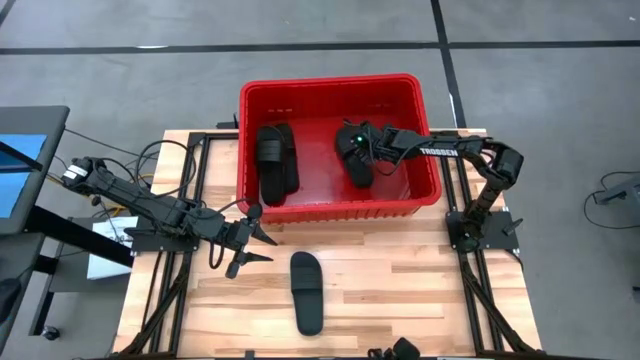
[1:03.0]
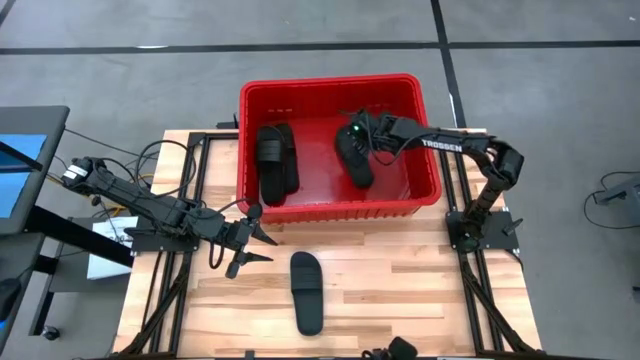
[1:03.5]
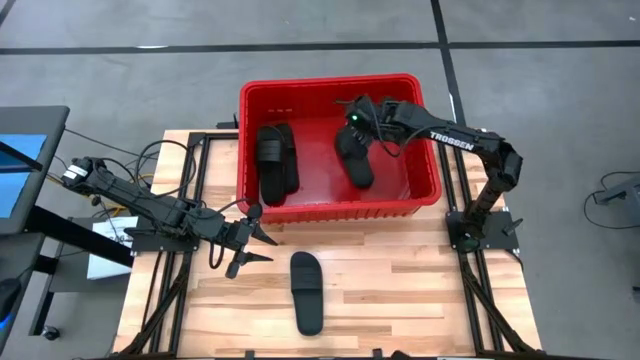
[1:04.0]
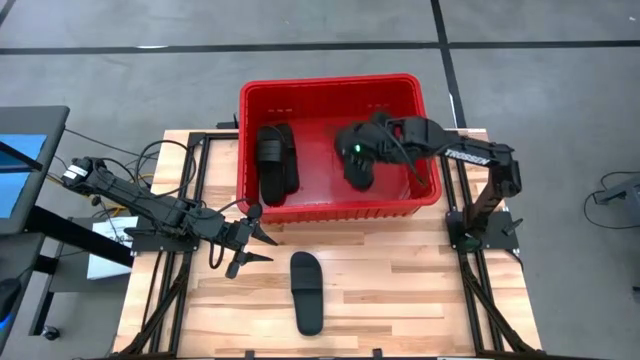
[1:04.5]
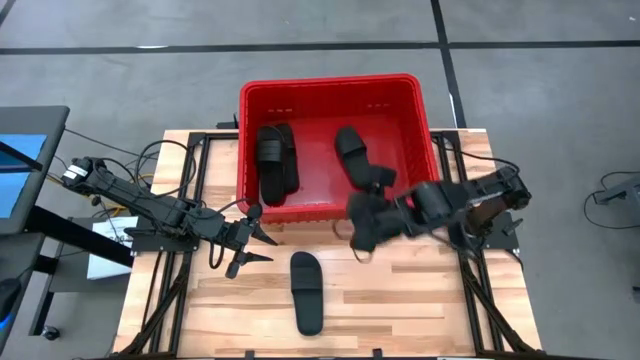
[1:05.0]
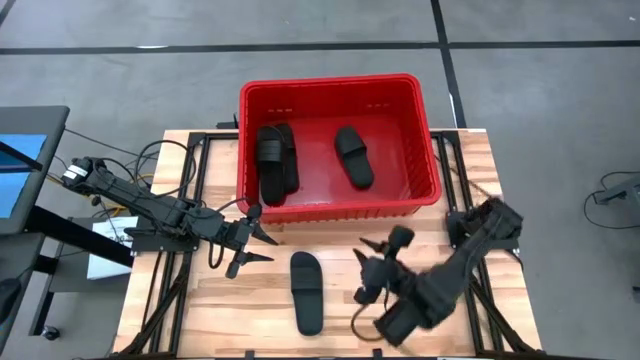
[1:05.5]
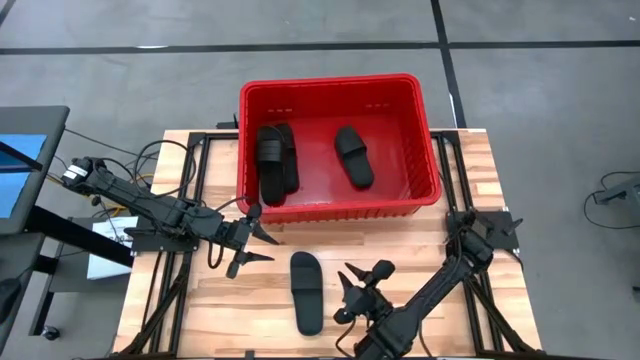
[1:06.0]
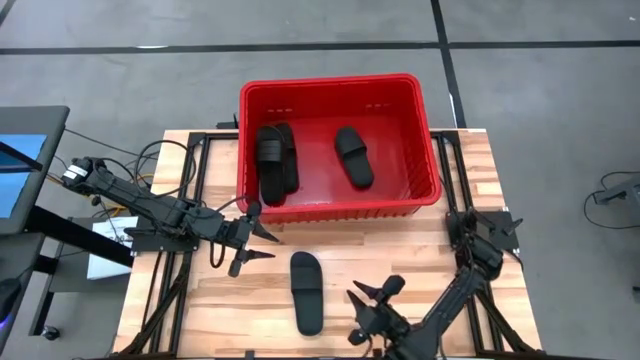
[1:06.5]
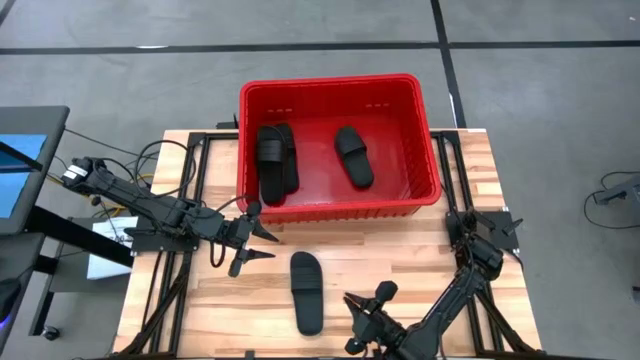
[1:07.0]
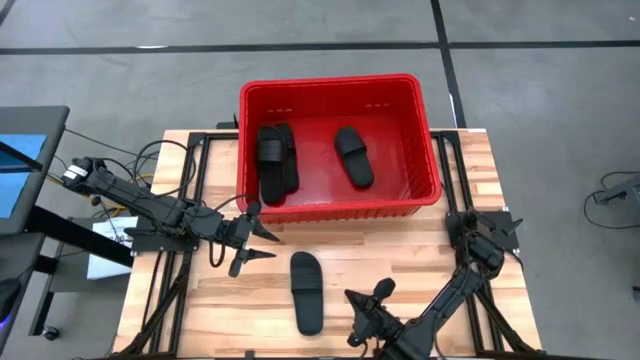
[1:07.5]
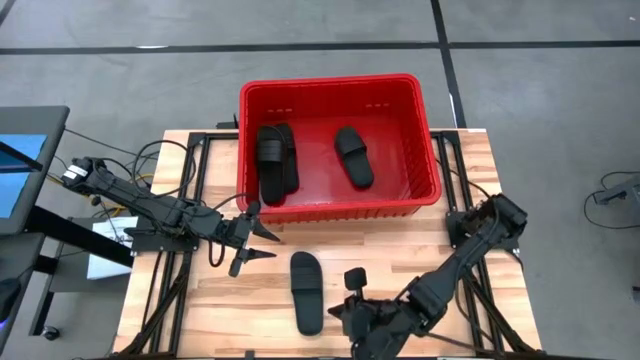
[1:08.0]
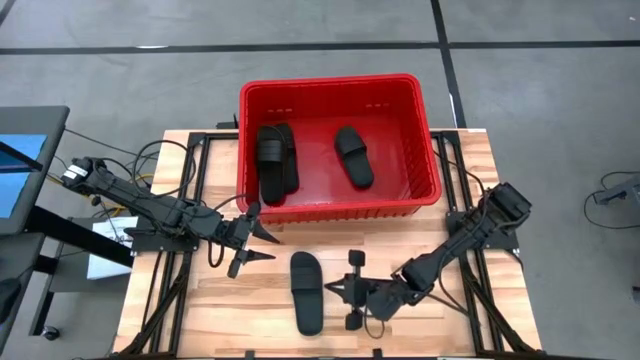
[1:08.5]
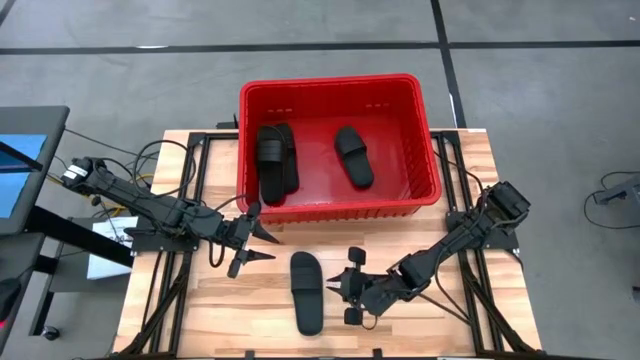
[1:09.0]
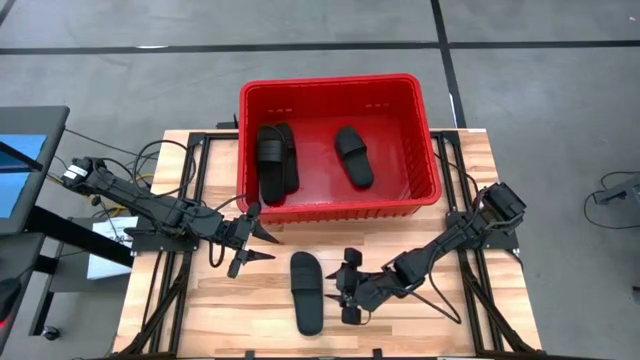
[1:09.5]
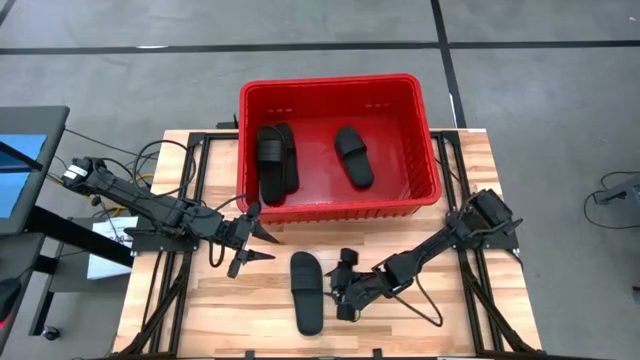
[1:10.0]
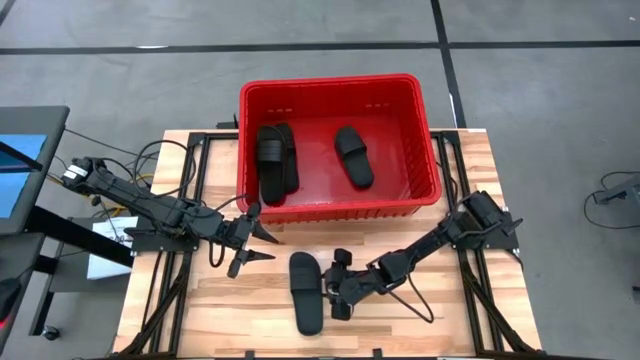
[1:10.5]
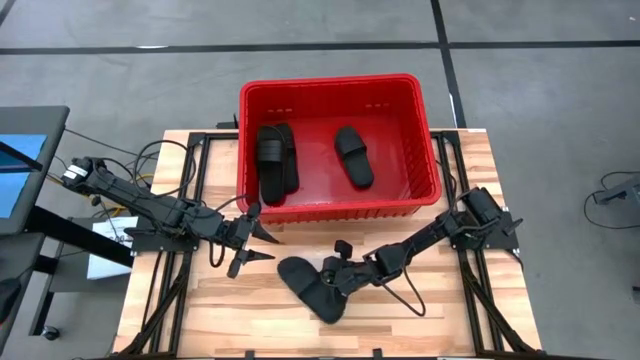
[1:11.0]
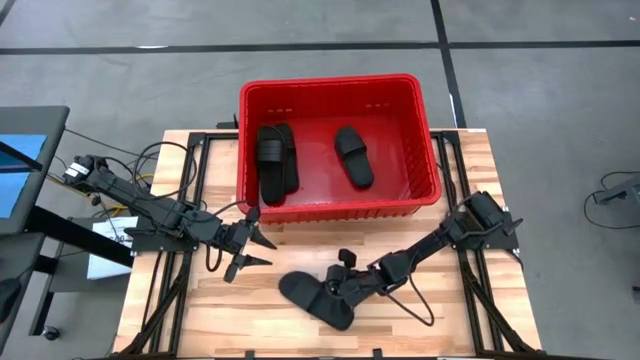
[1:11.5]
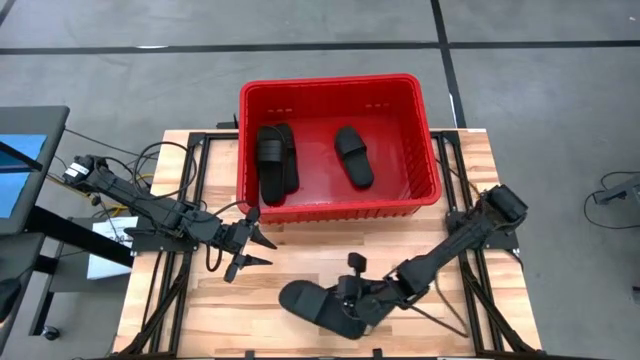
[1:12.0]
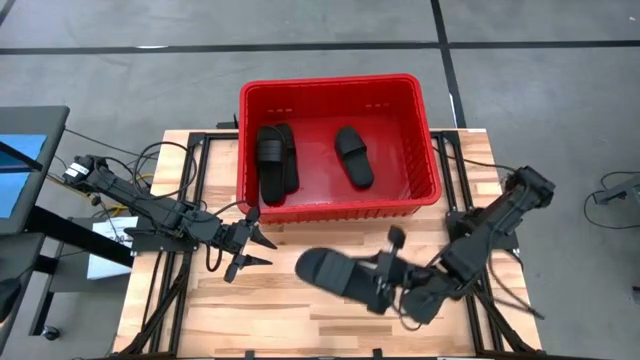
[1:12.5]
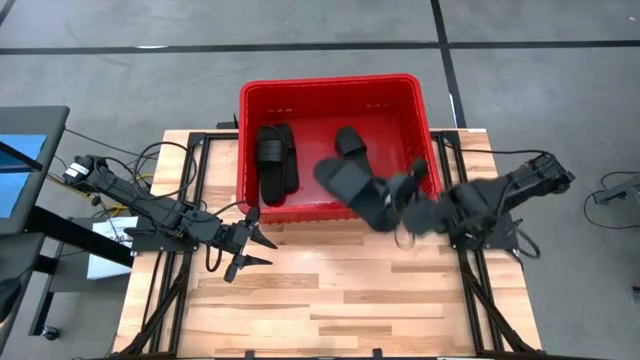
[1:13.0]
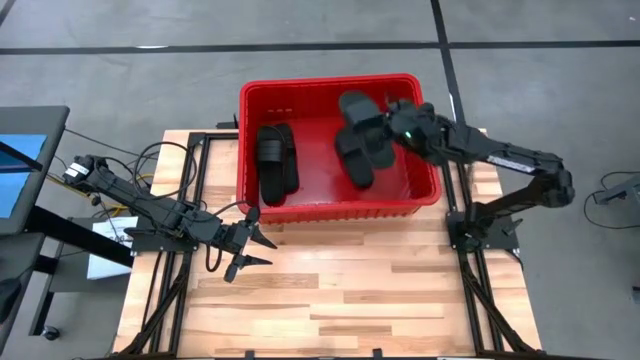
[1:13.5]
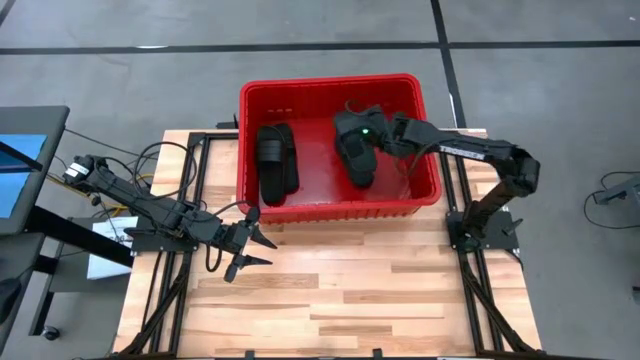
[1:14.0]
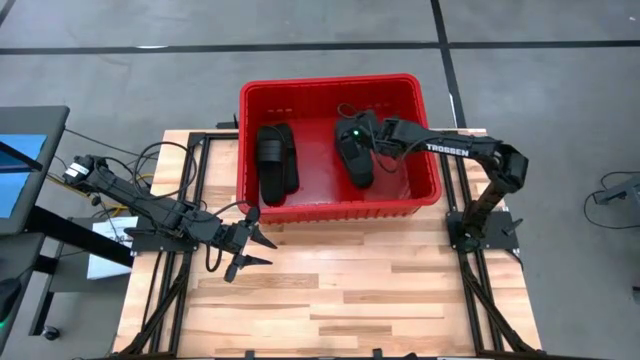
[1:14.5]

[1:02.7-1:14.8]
Task: Pick and place slides into bin
Put the black slides into the red bin

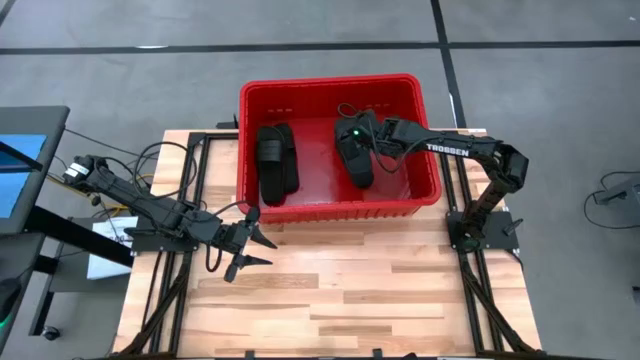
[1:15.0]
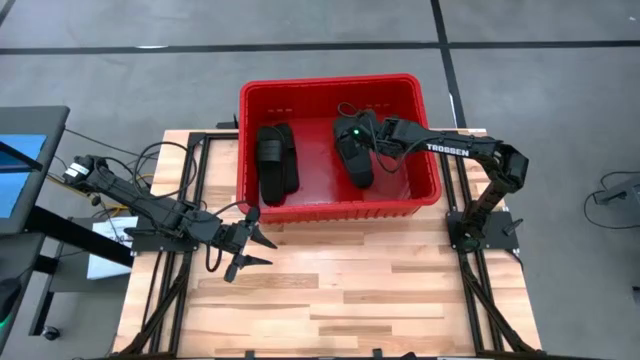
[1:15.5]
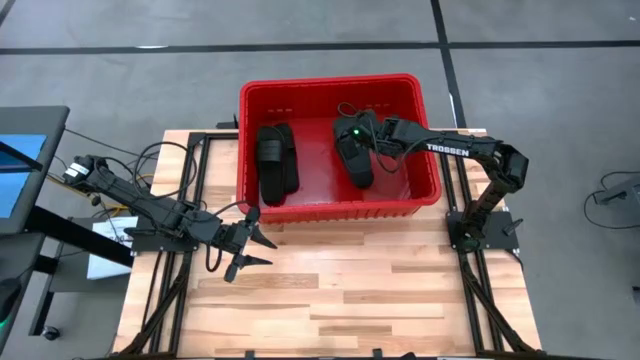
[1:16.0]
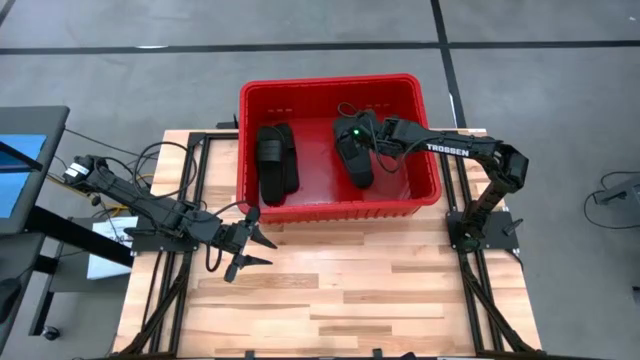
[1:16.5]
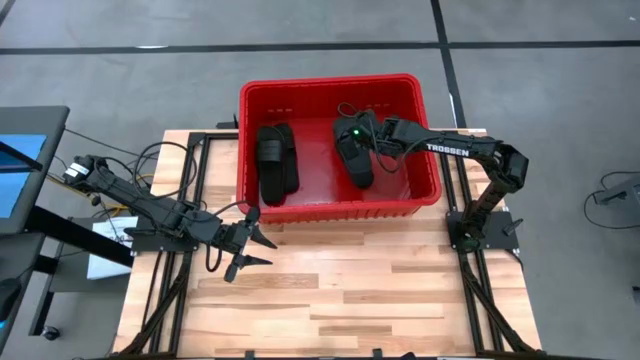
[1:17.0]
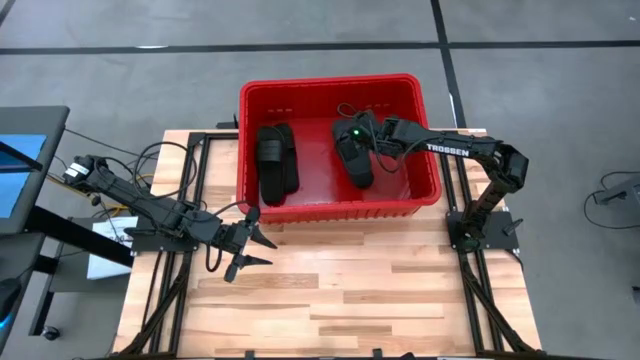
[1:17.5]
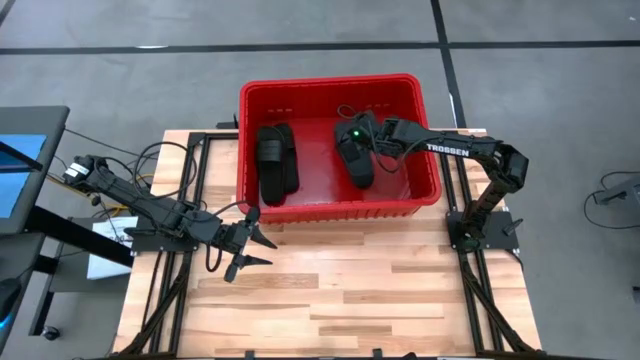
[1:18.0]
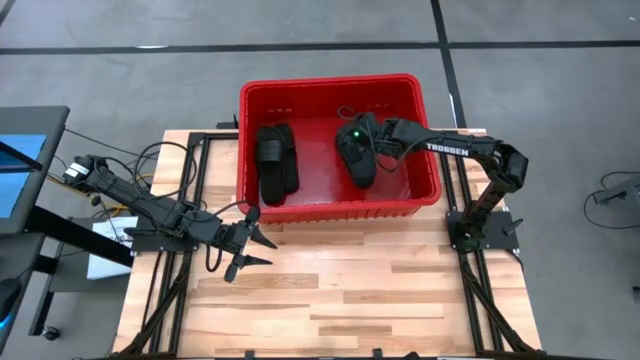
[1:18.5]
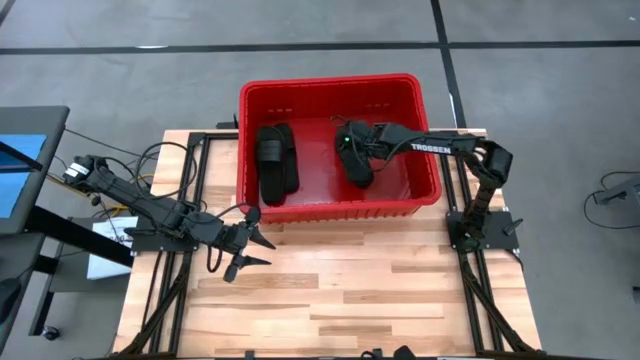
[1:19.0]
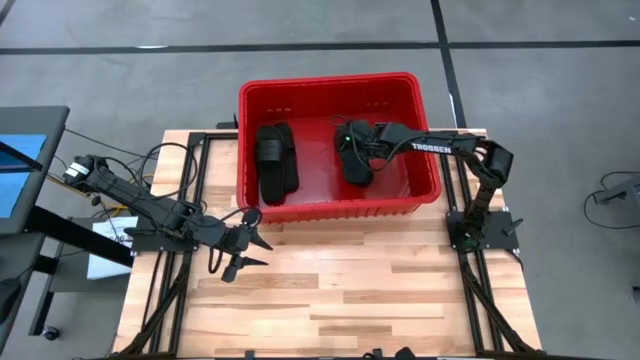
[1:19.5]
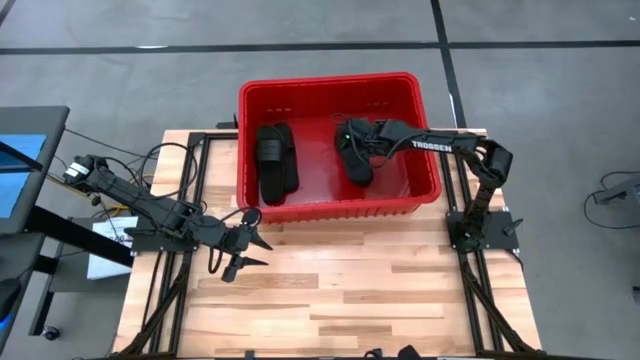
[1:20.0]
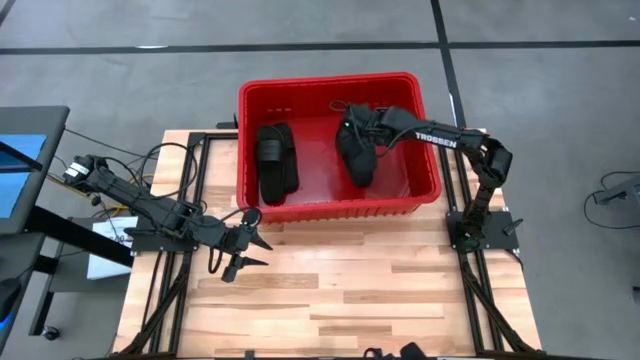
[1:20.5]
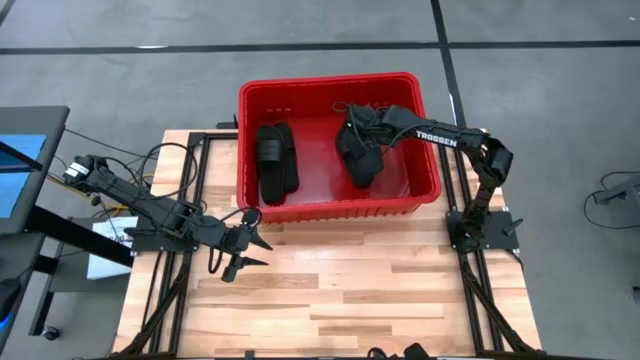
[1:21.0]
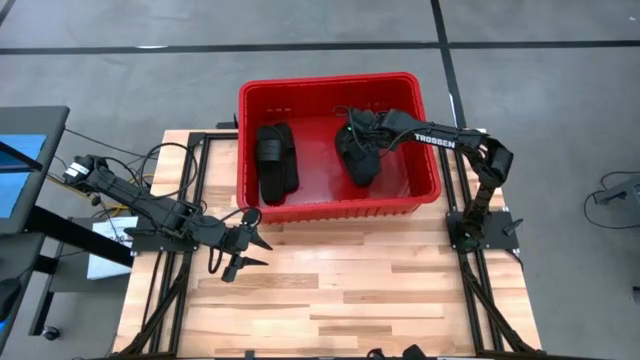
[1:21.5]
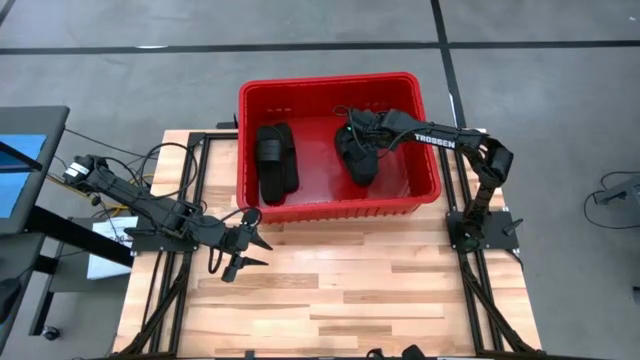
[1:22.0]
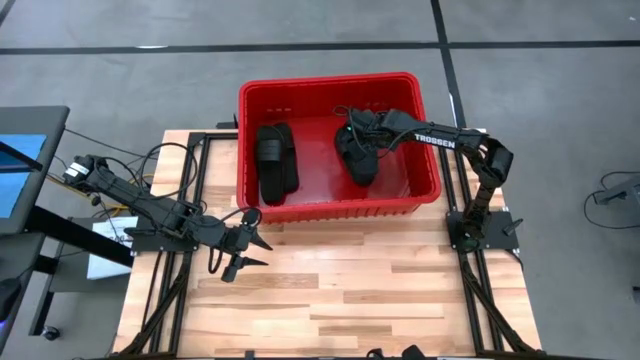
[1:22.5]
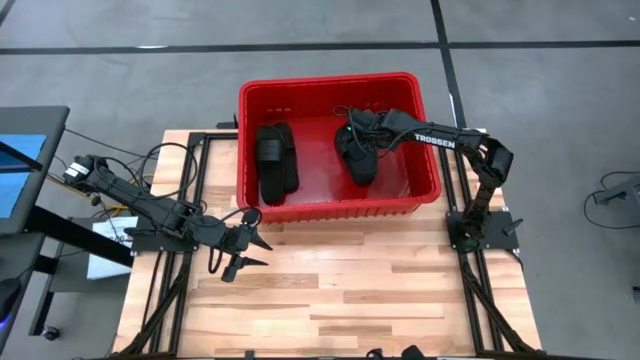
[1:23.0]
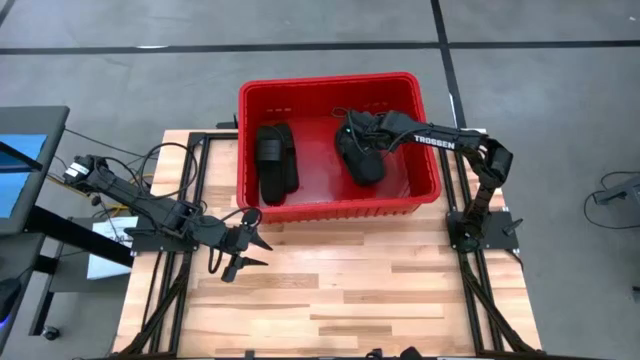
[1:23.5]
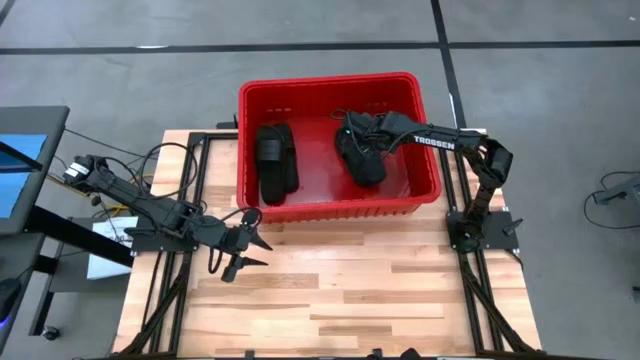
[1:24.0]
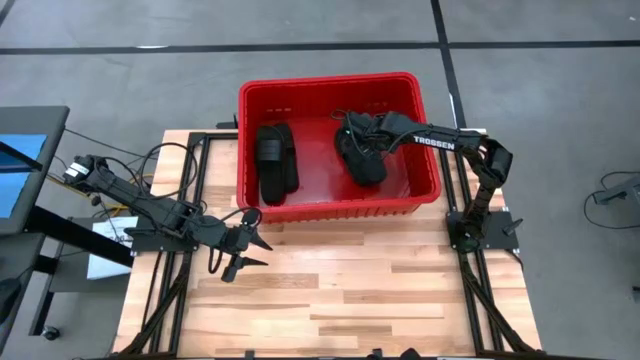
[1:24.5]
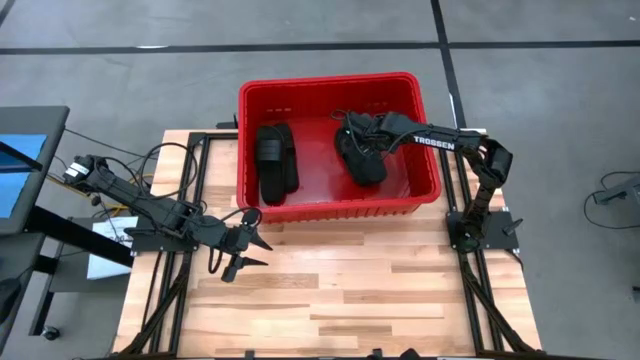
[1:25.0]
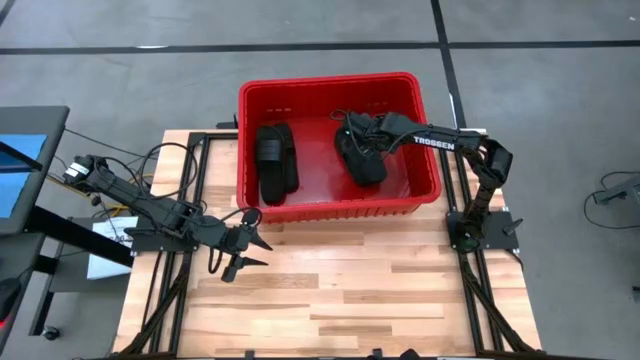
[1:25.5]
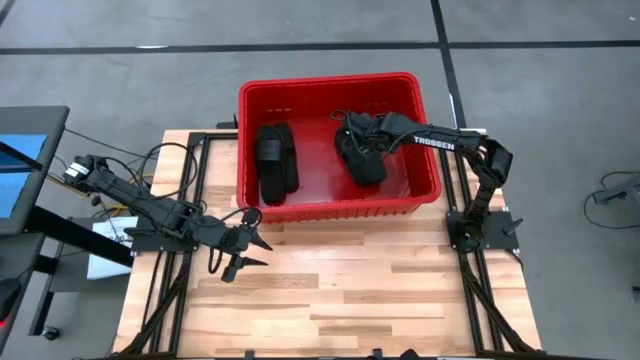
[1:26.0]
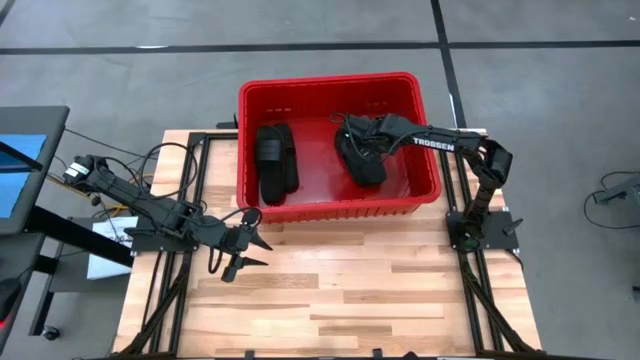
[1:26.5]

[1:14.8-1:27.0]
Put the black slides into the red bin
